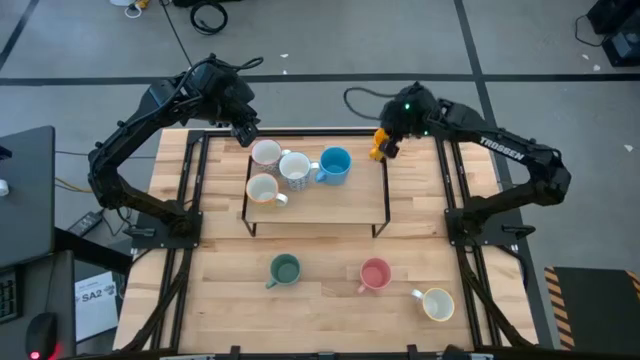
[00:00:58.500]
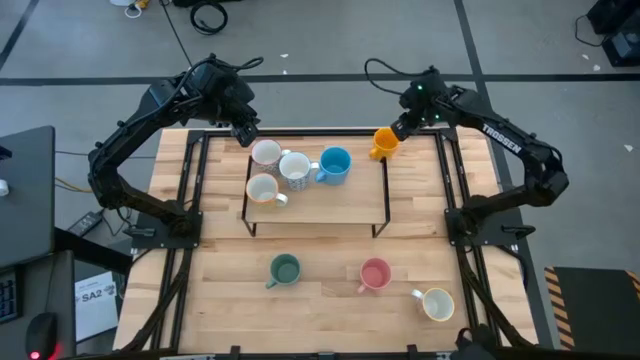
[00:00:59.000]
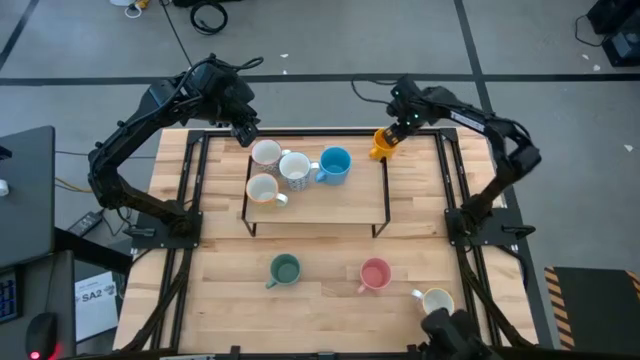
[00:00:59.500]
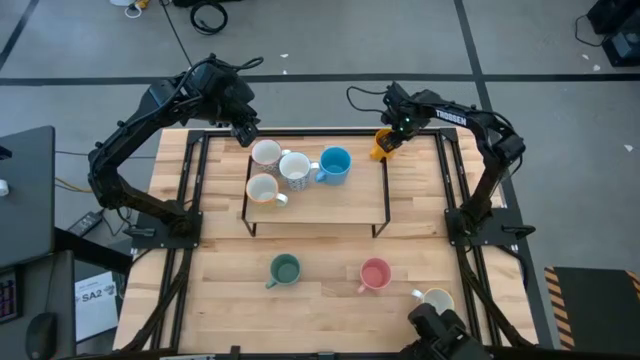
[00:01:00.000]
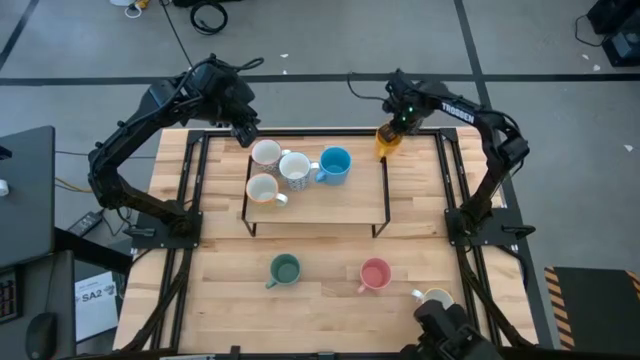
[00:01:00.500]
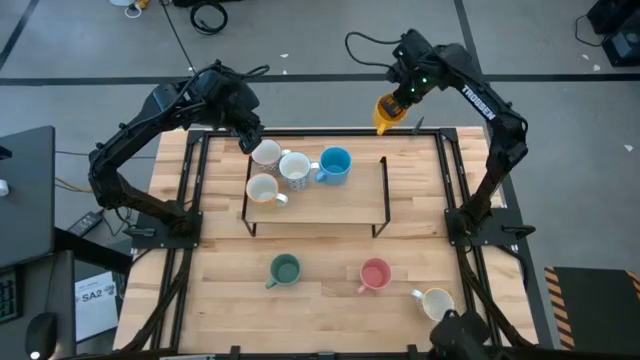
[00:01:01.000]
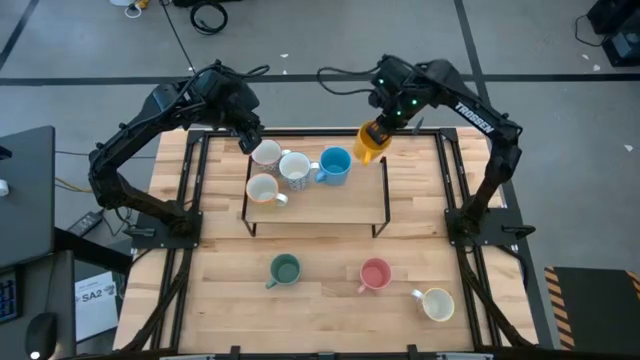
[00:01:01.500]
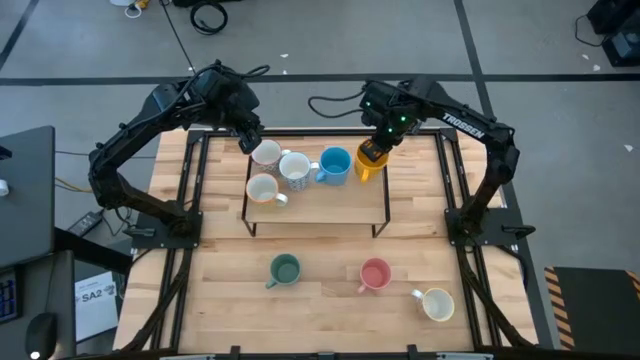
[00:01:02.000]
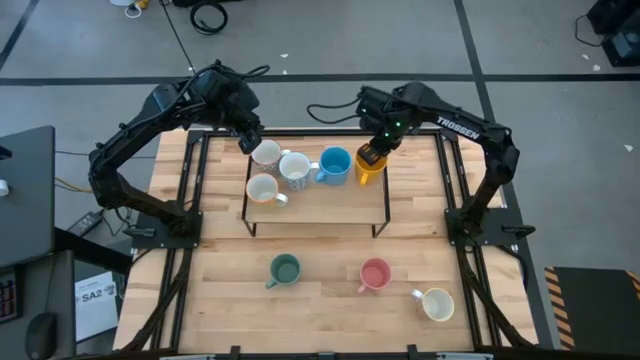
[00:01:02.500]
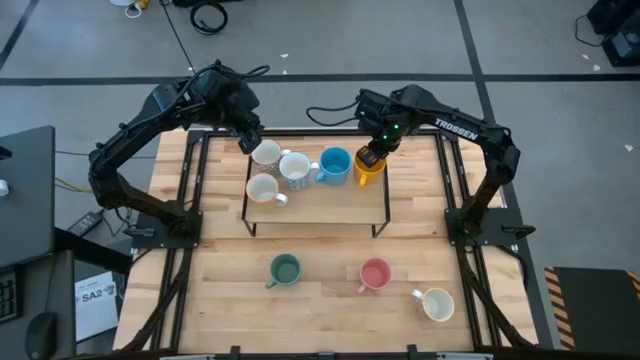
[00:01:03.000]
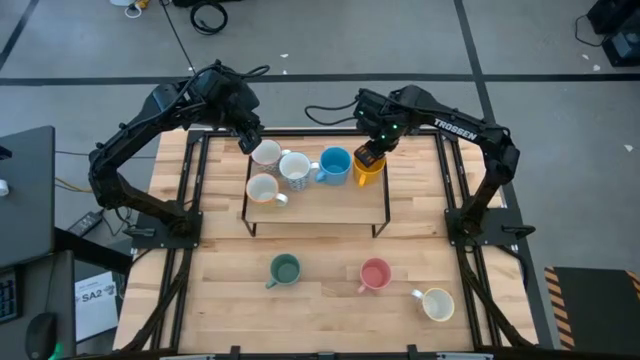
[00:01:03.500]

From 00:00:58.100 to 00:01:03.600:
Task: Place coffee mugs
Put the yellow mug on the shelf

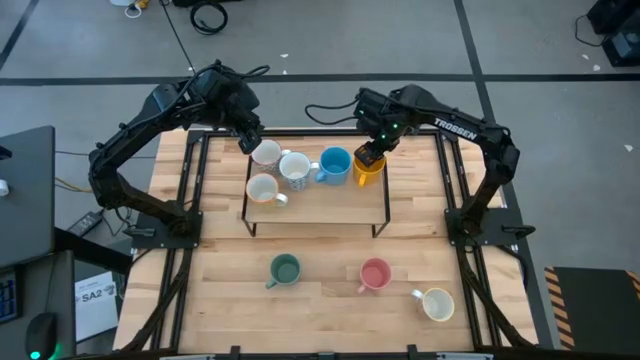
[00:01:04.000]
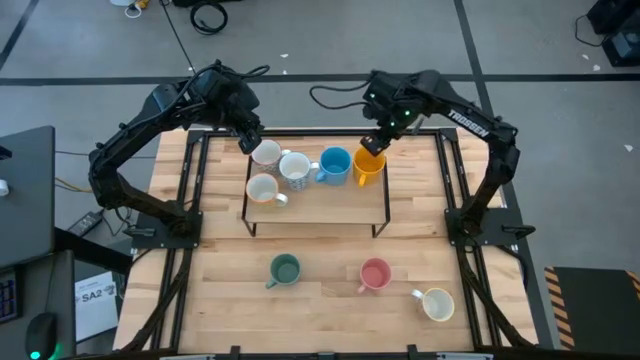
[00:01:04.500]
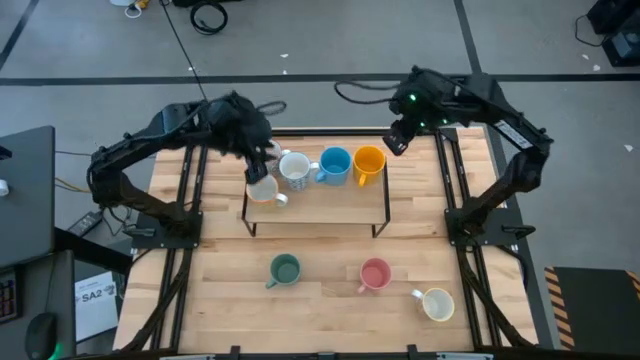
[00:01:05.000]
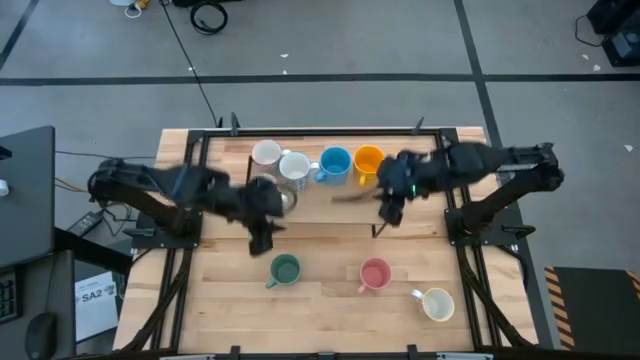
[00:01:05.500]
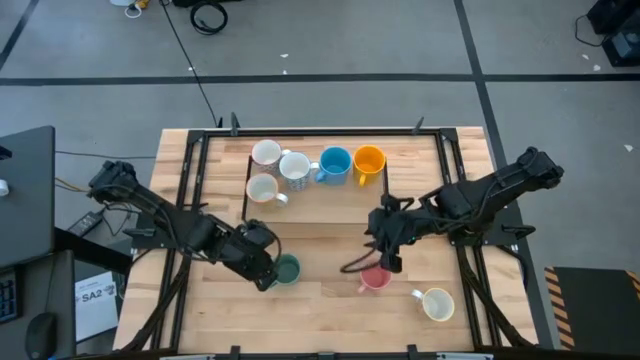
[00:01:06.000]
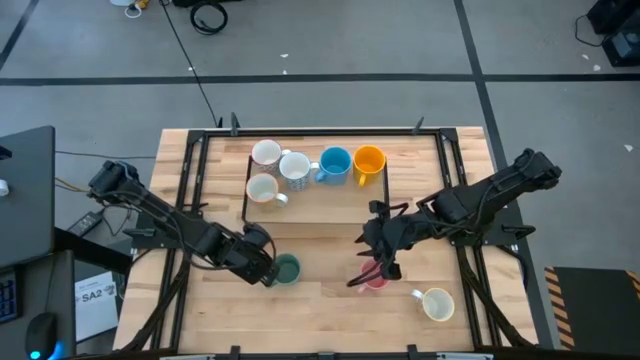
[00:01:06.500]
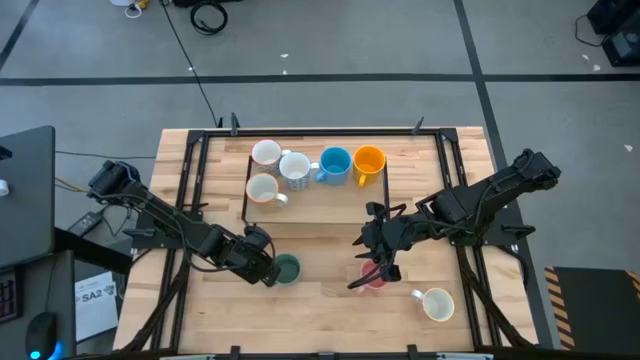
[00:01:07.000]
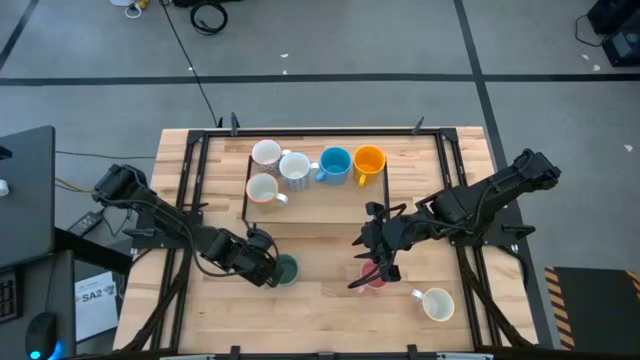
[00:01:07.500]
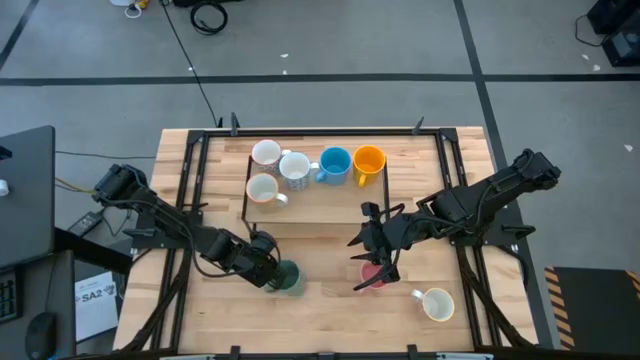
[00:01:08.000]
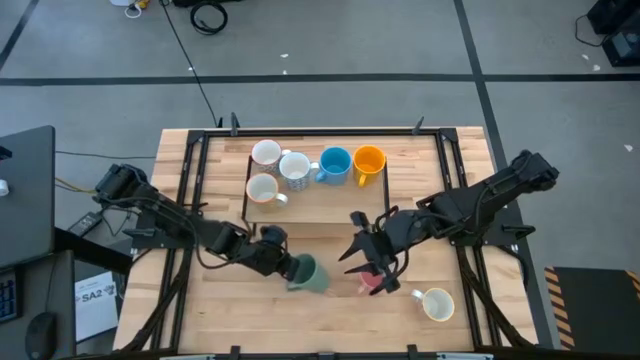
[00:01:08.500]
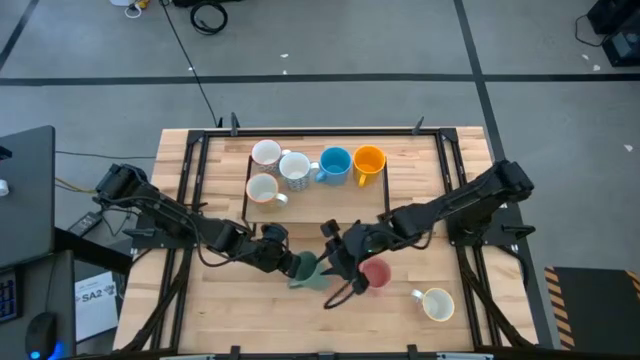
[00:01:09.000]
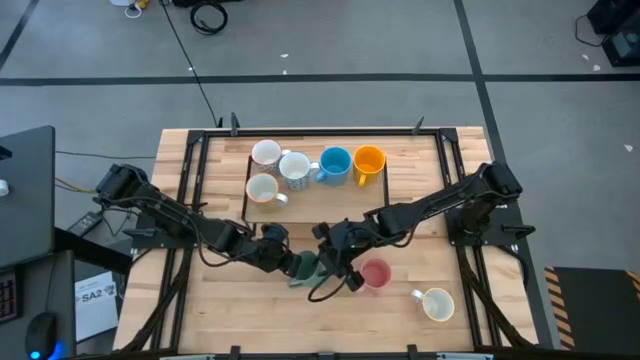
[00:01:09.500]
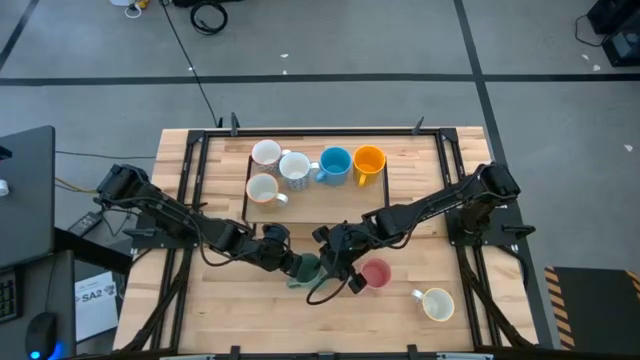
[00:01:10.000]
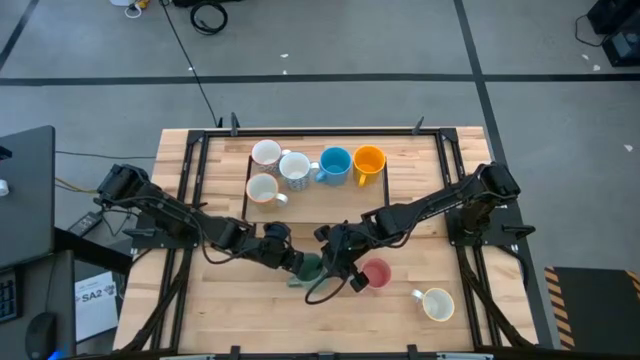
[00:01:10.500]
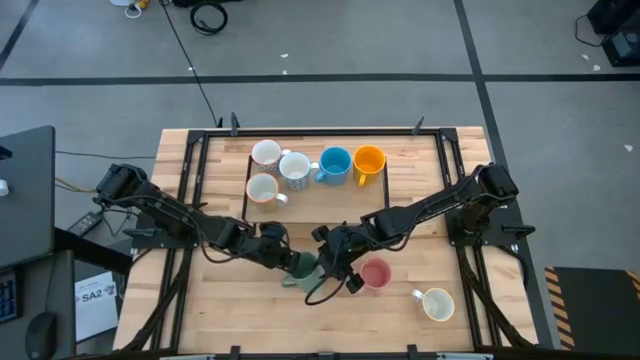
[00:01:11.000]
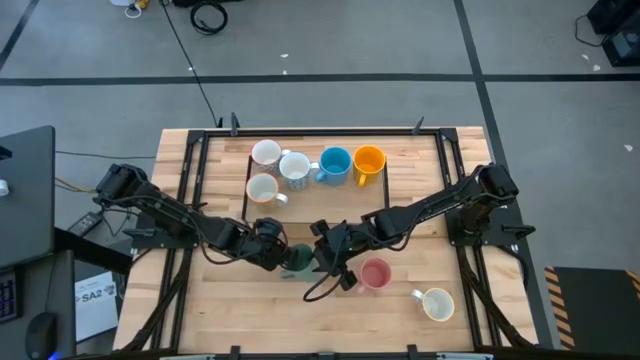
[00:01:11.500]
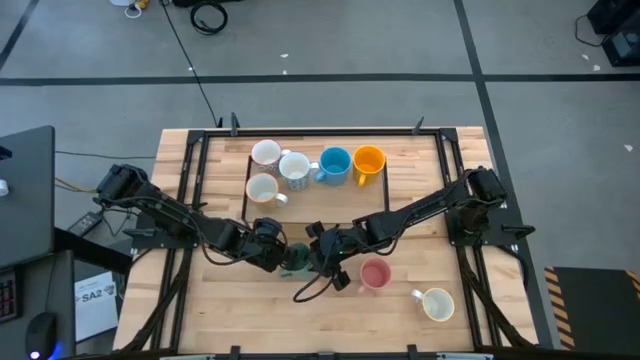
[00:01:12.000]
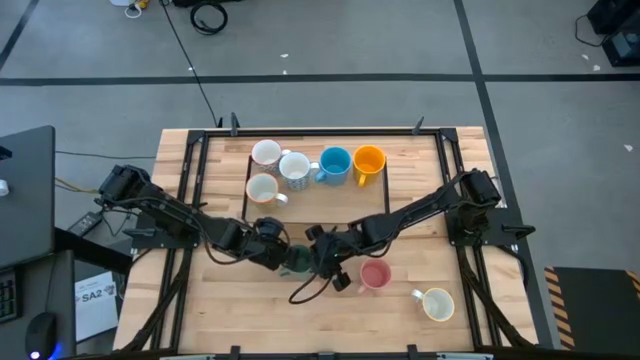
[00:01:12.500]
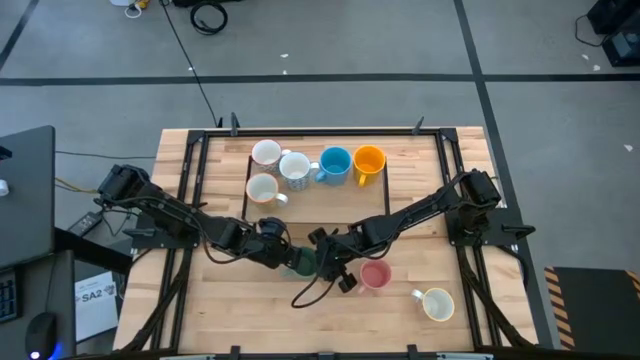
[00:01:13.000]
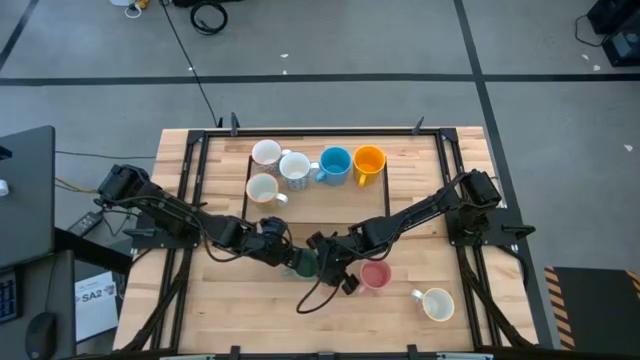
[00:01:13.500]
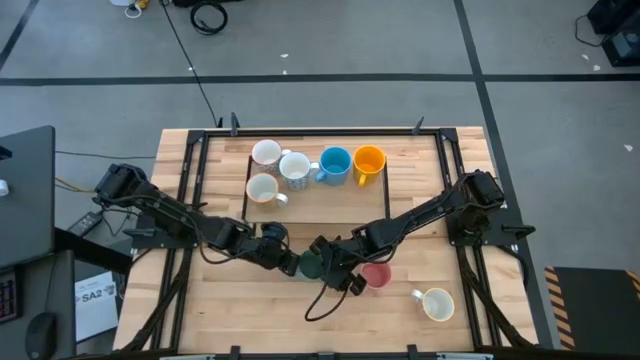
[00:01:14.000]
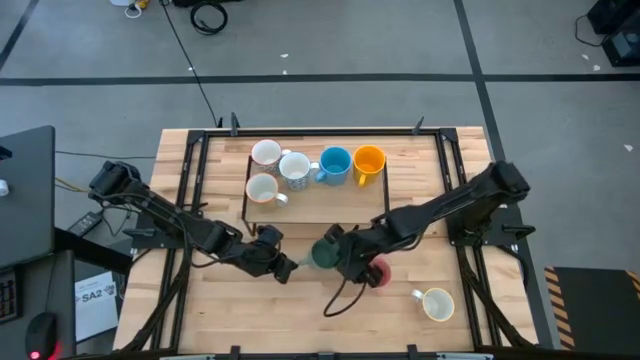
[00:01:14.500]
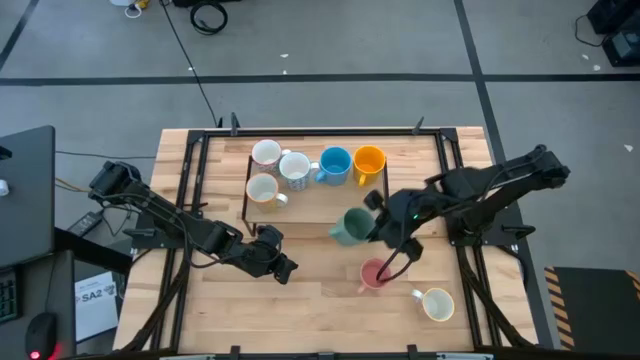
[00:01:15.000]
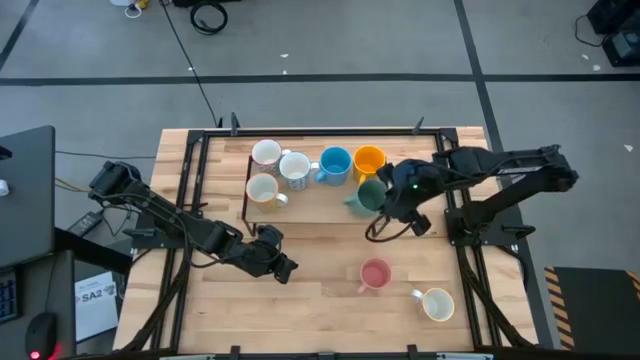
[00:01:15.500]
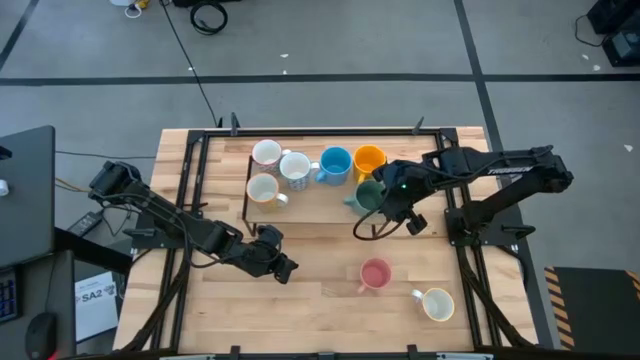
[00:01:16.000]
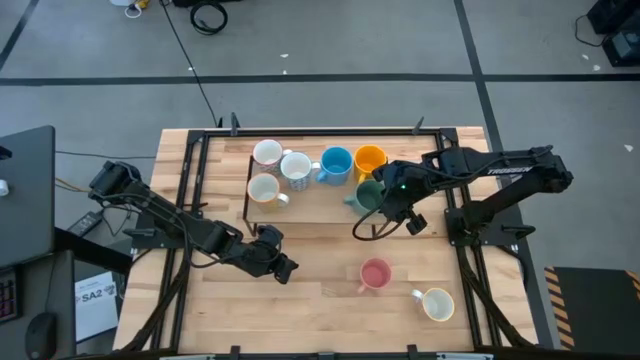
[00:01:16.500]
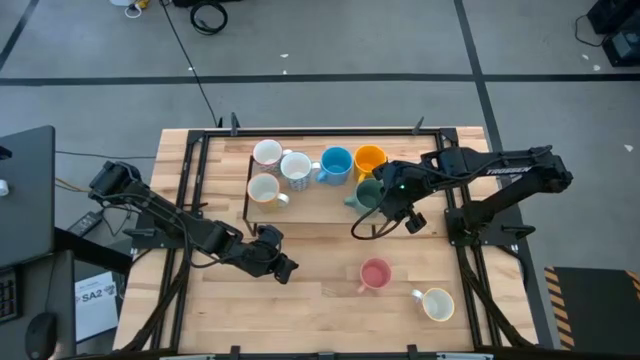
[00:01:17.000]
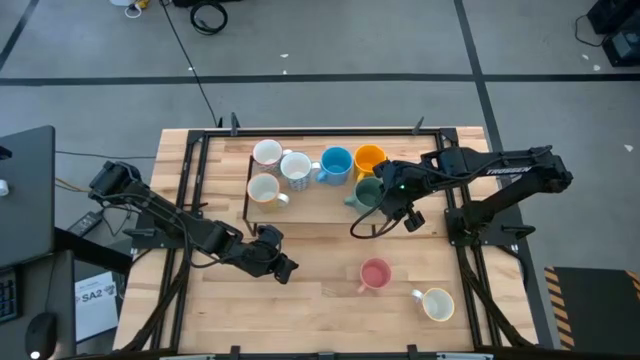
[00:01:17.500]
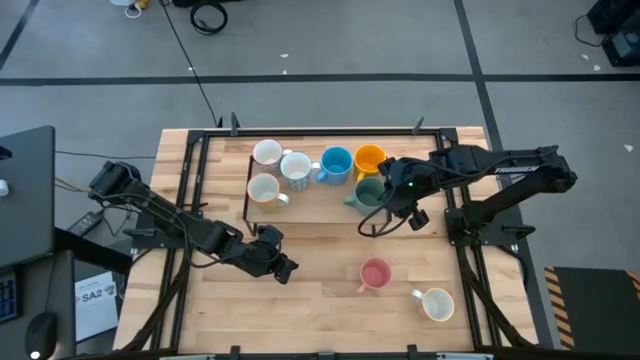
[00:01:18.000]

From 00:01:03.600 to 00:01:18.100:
Put the green mug on the shelf
